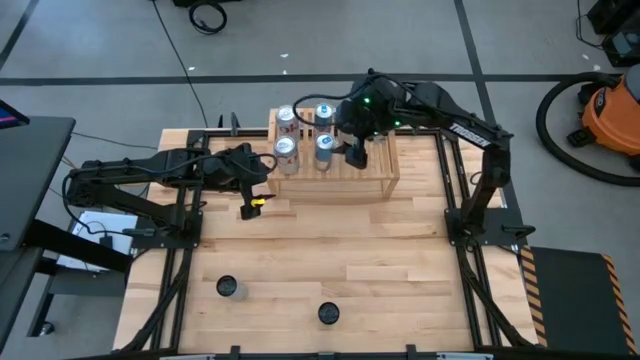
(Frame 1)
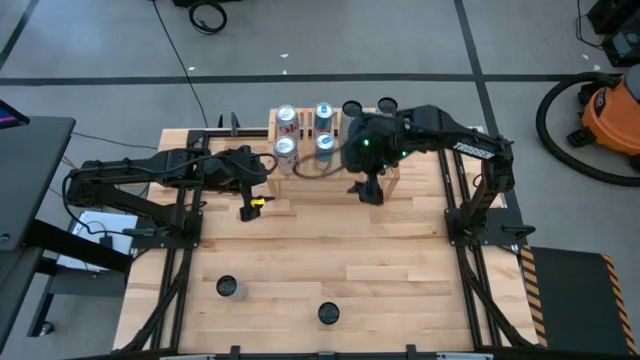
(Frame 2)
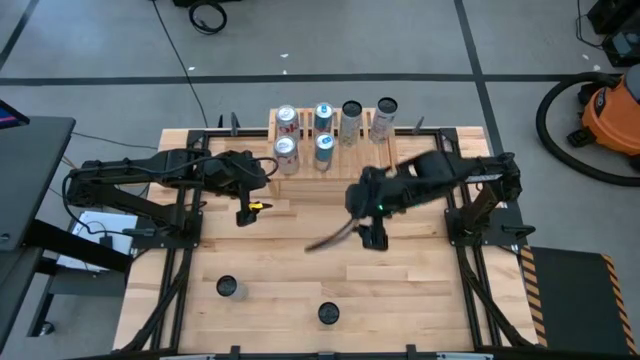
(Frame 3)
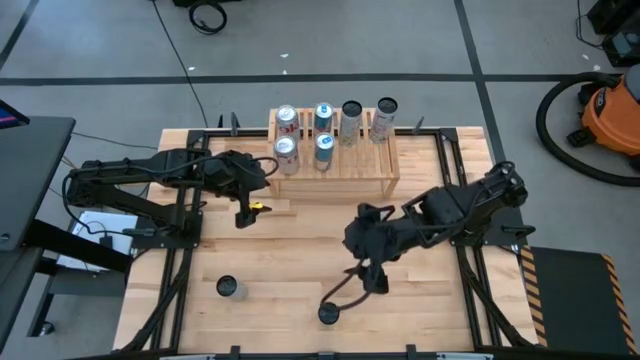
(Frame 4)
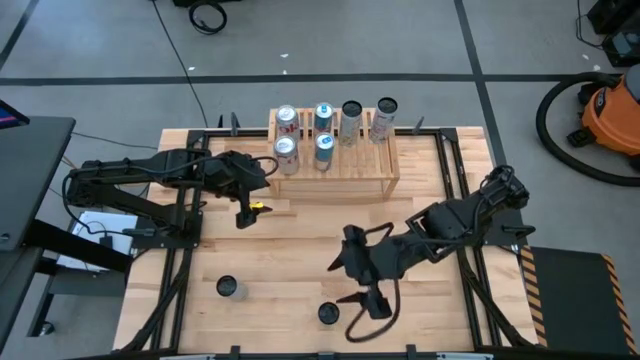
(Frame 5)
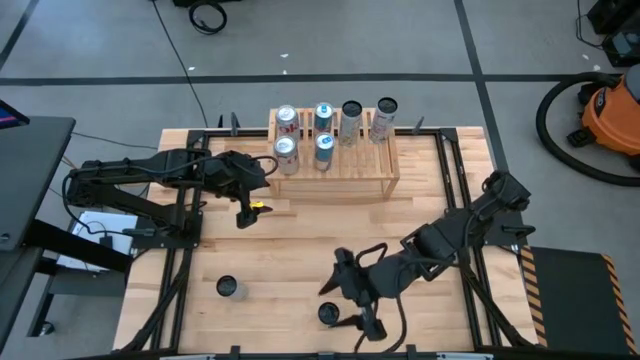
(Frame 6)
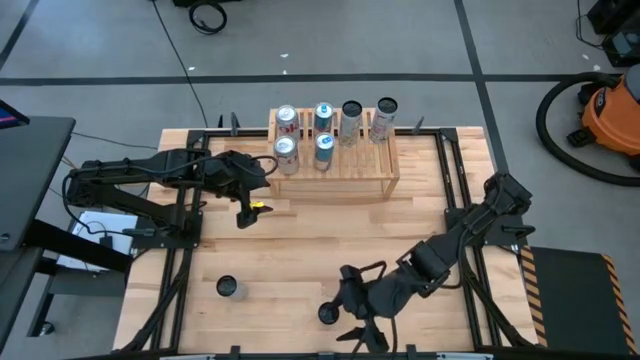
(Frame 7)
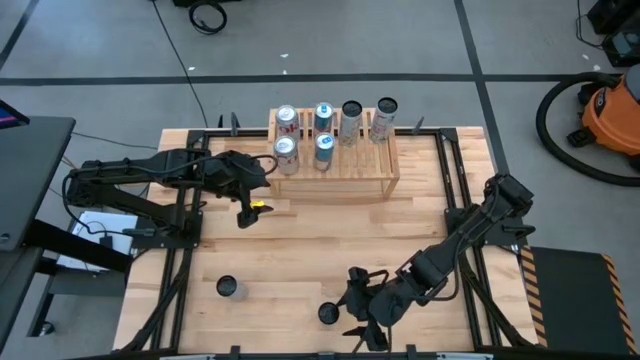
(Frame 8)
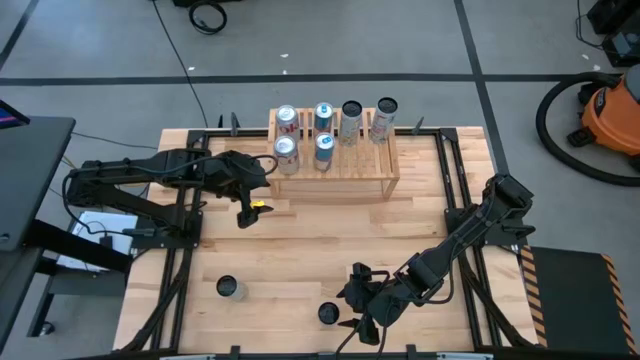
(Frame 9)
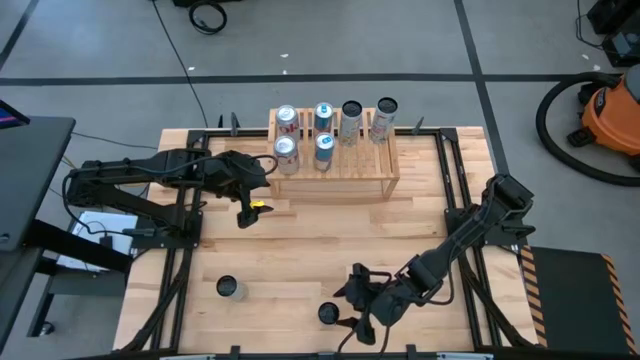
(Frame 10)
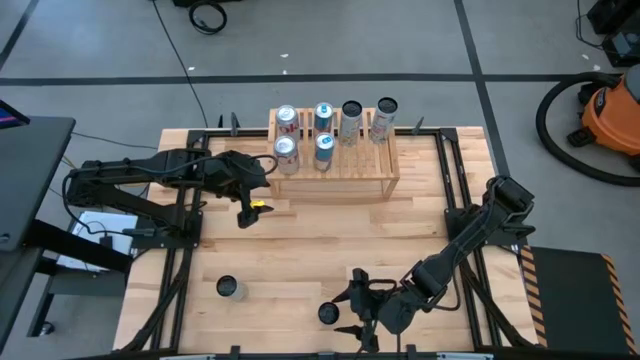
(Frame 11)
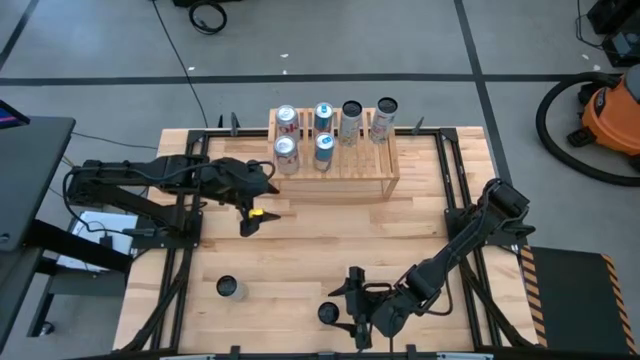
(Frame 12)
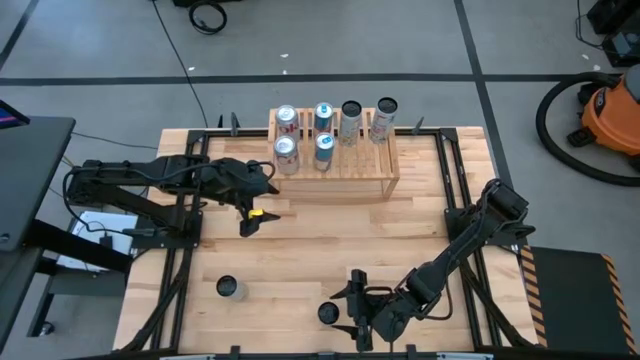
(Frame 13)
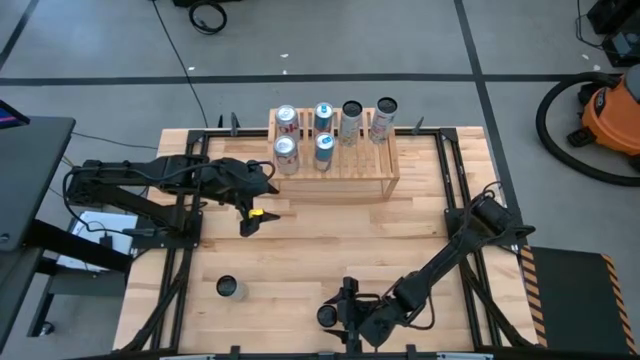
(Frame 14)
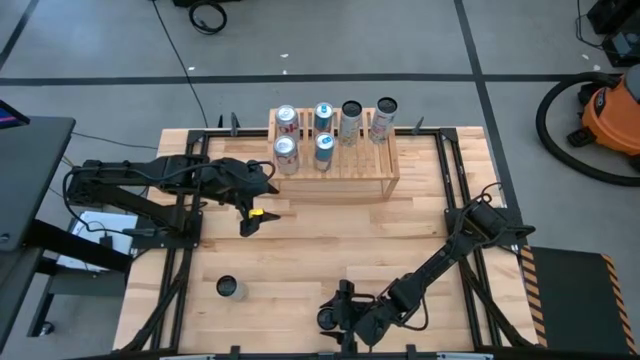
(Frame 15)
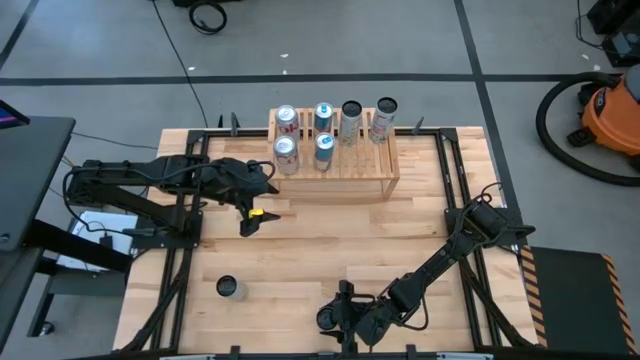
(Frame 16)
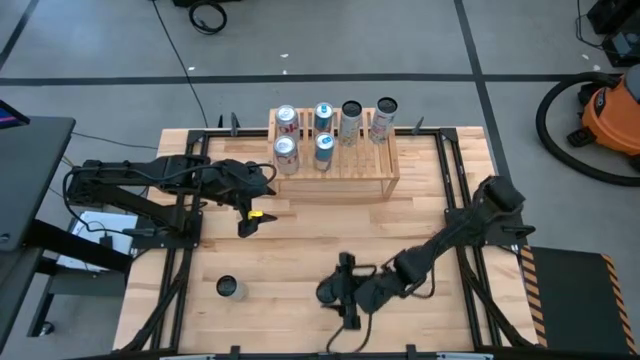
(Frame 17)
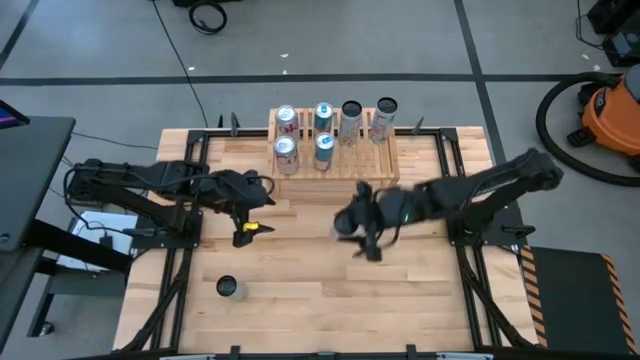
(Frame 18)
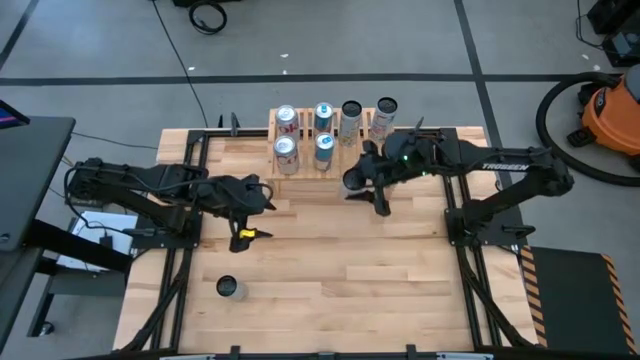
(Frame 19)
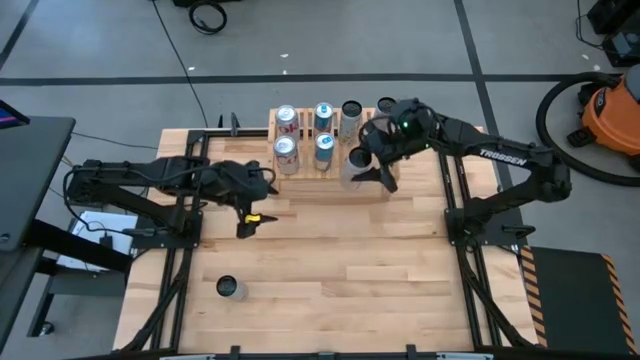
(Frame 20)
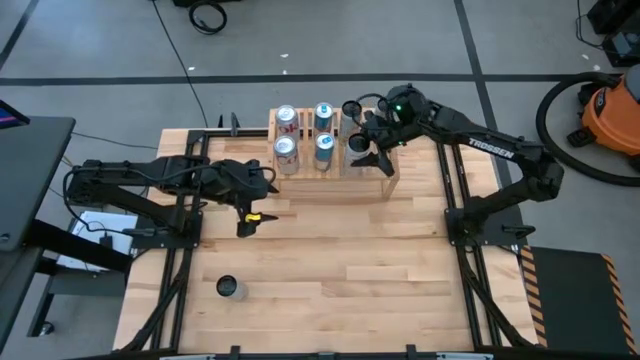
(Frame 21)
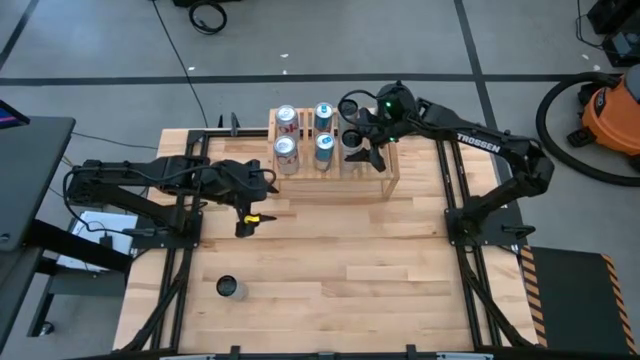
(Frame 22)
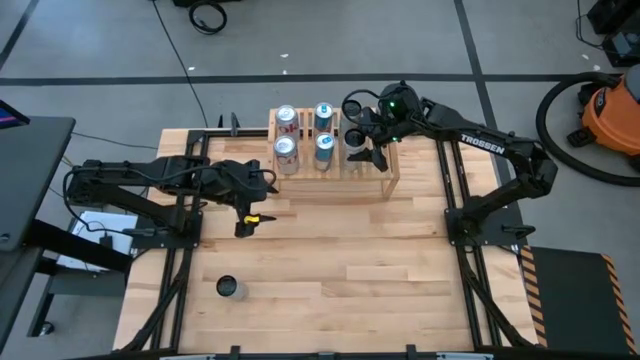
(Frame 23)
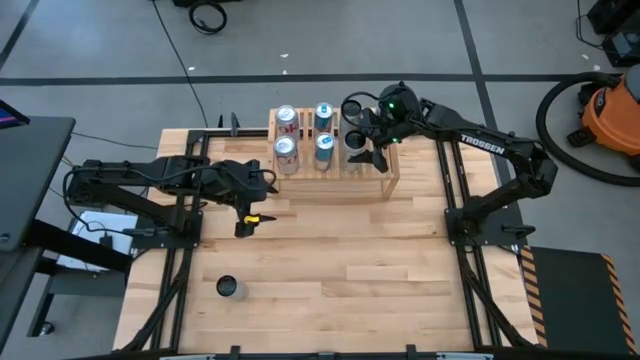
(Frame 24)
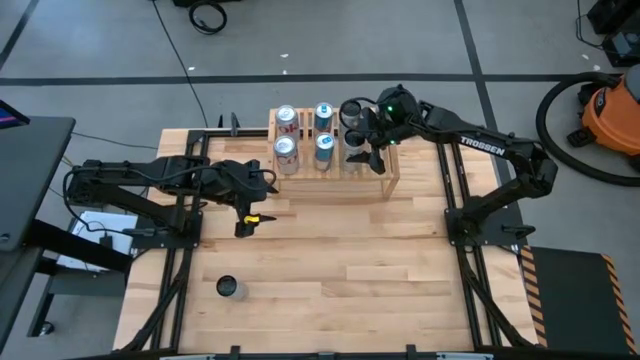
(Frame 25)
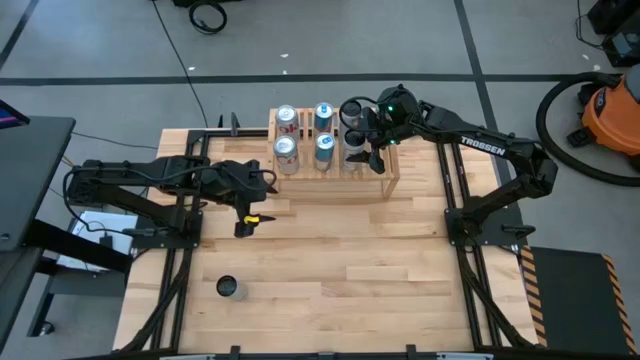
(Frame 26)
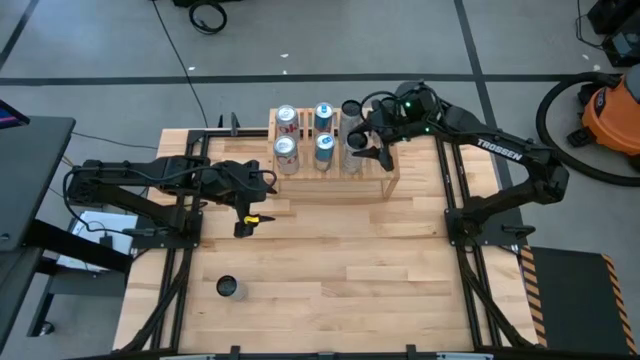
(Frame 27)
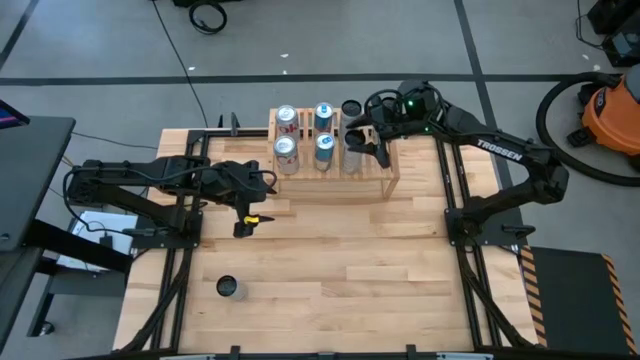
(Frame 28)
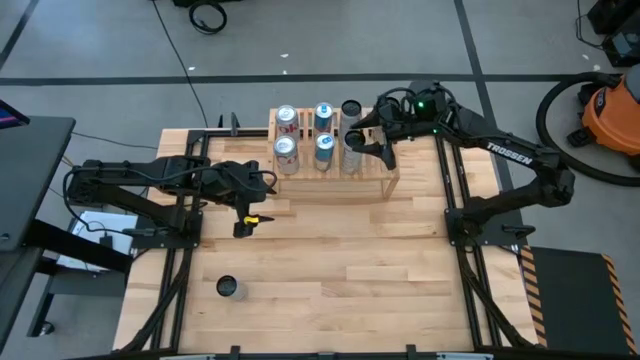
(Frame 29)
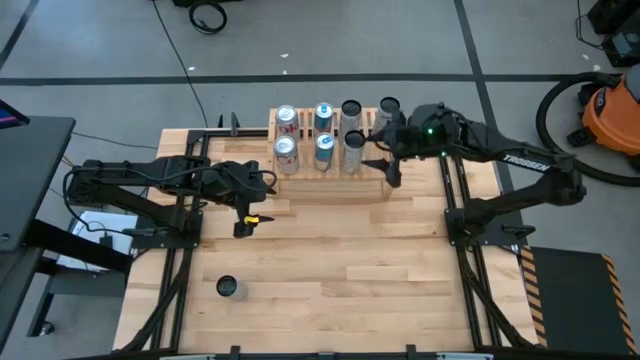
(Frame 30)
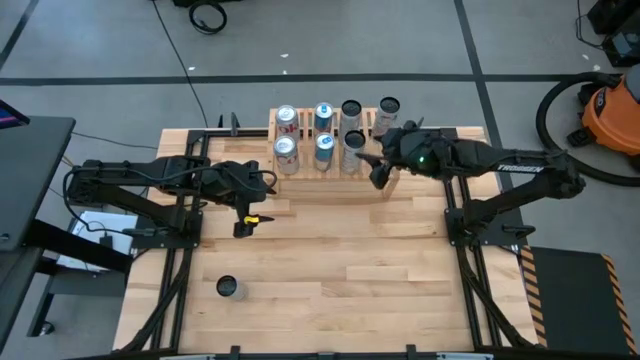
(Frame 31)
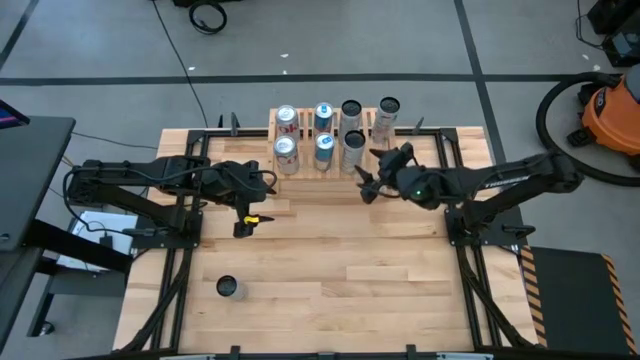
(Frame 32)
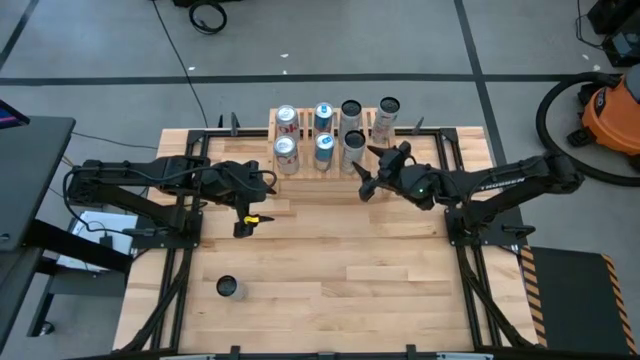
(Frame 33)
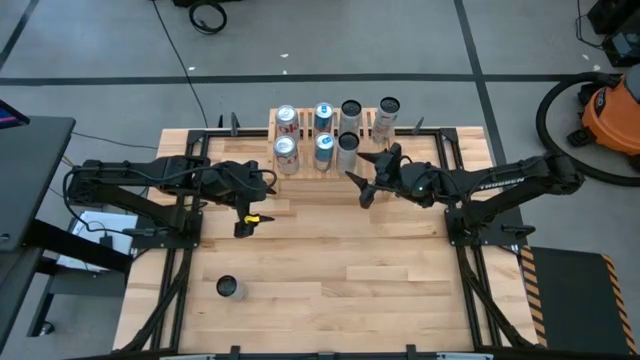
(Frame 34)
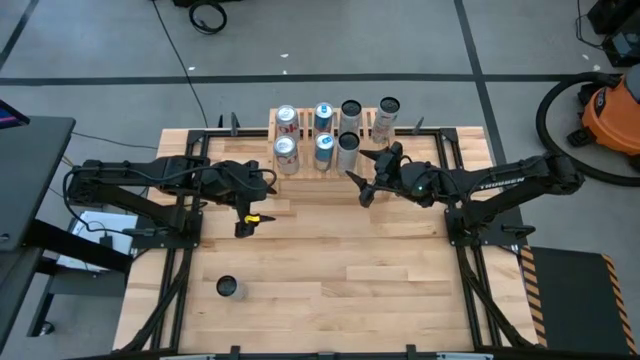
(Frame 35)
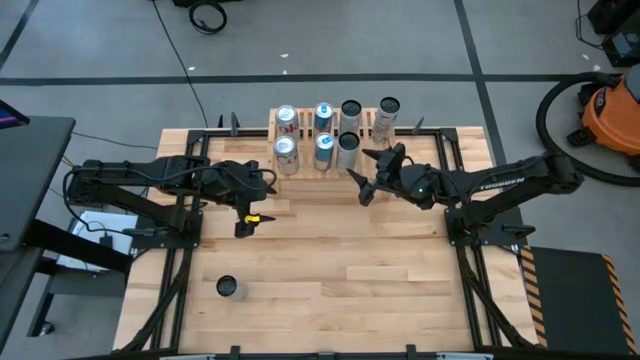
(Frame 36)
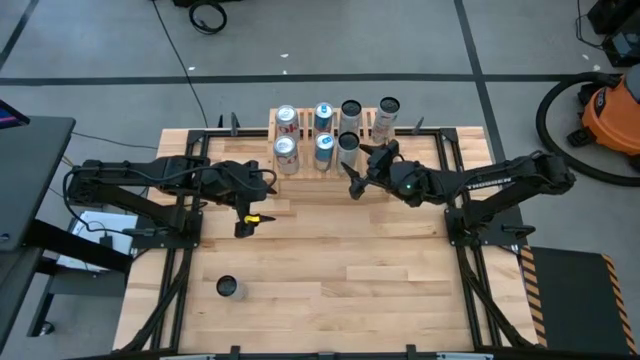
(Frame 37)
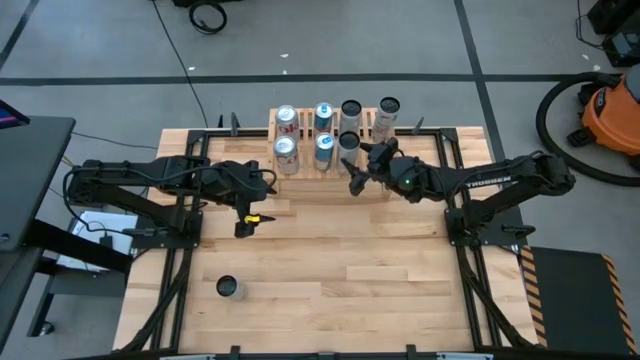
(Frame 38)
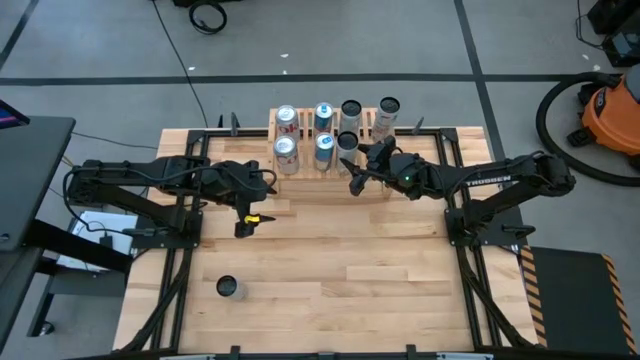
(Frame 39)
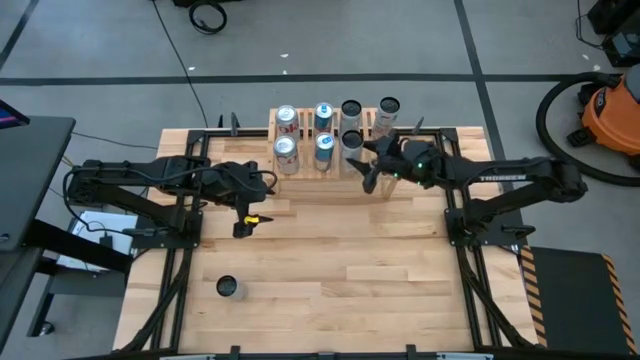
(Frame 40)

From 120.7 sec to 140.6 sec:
Task: Place canned beverage on shelf
Put the white-yellow soda can aligned with the other white-yellow soda can on the shelf
